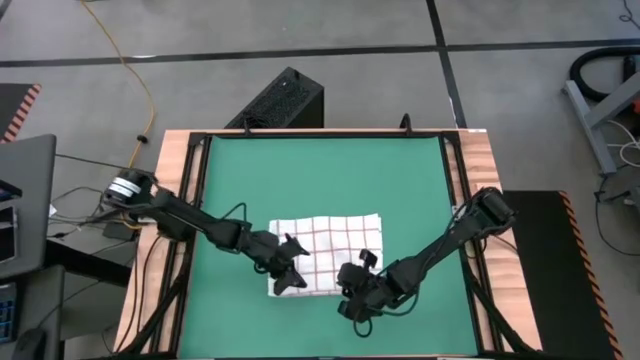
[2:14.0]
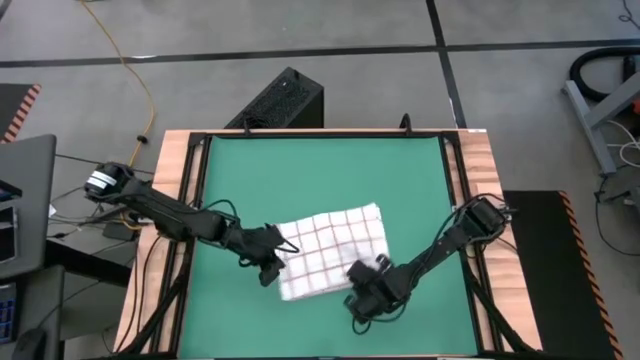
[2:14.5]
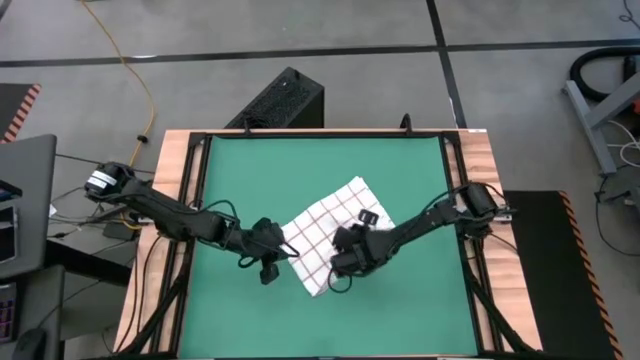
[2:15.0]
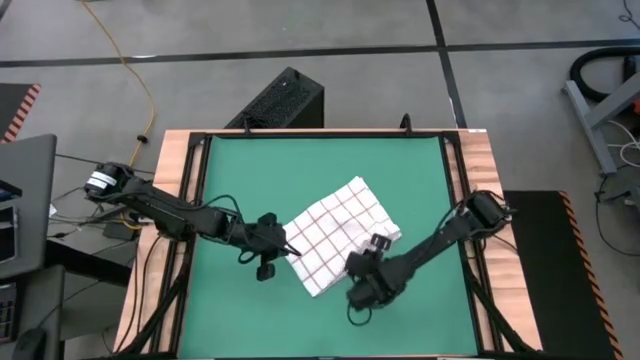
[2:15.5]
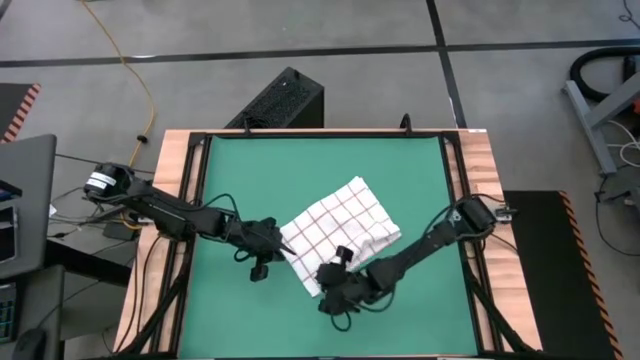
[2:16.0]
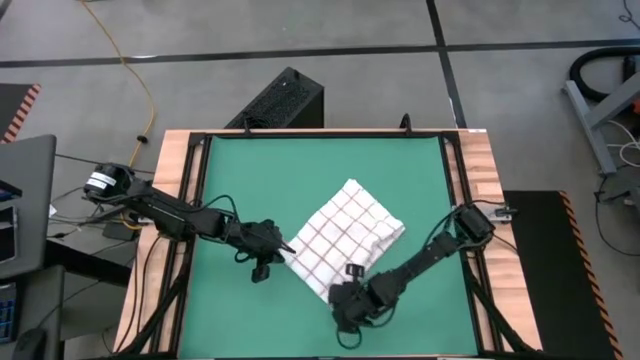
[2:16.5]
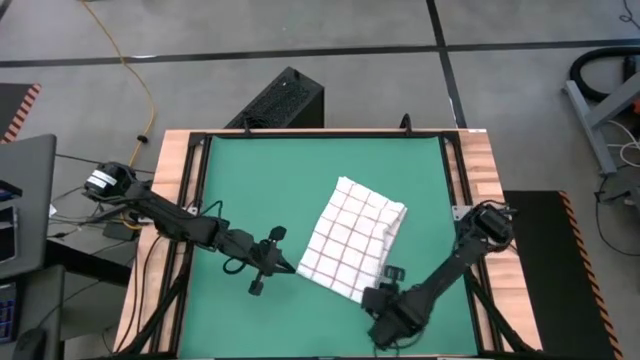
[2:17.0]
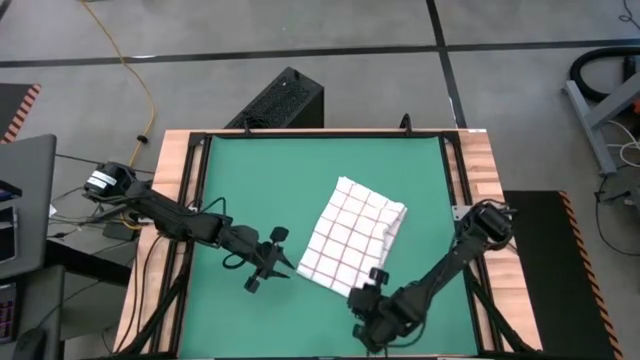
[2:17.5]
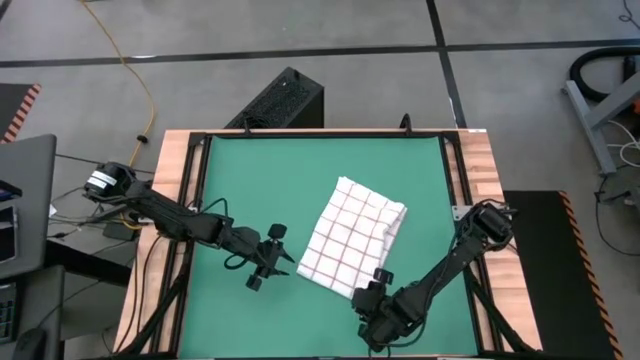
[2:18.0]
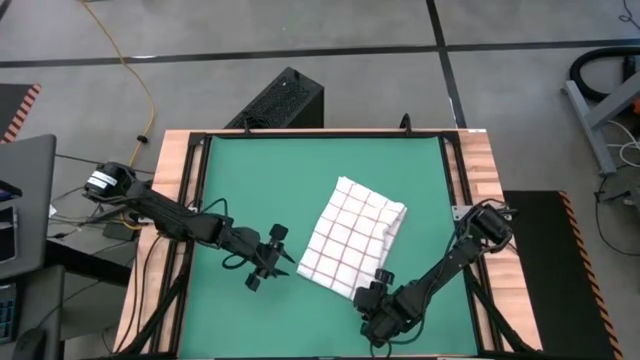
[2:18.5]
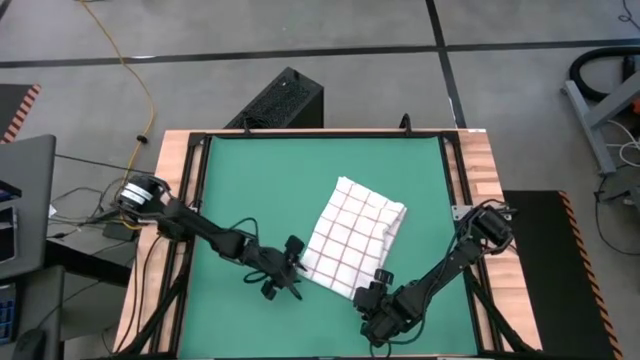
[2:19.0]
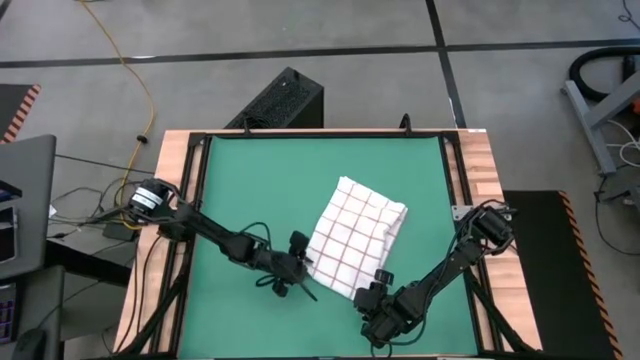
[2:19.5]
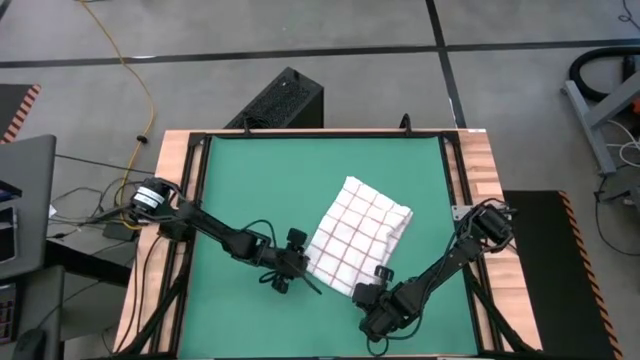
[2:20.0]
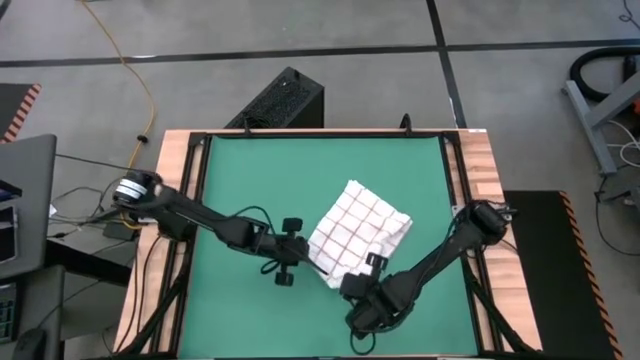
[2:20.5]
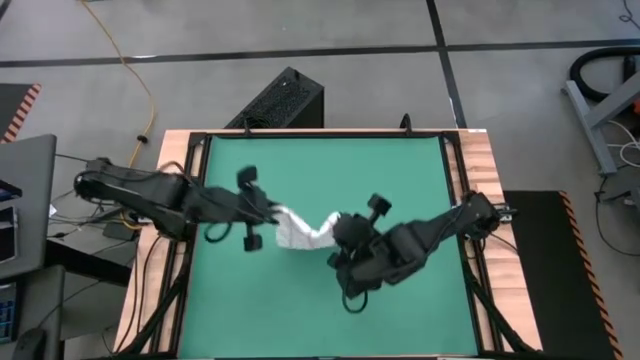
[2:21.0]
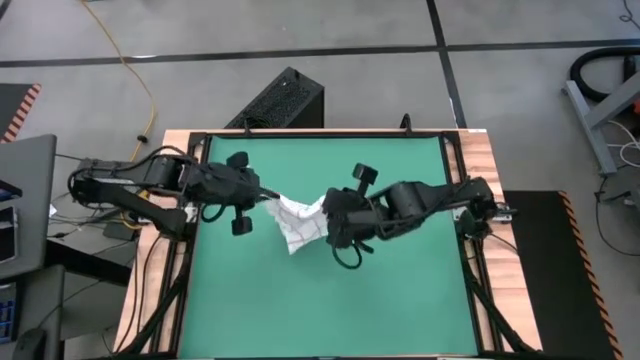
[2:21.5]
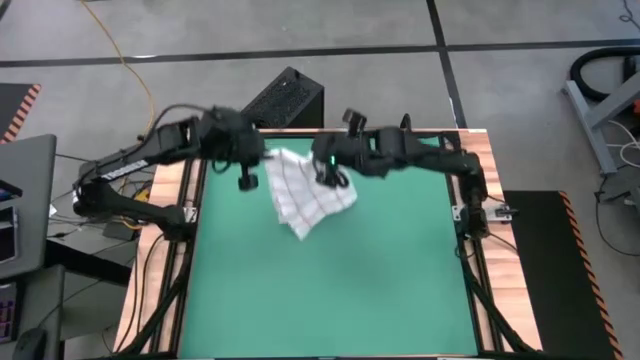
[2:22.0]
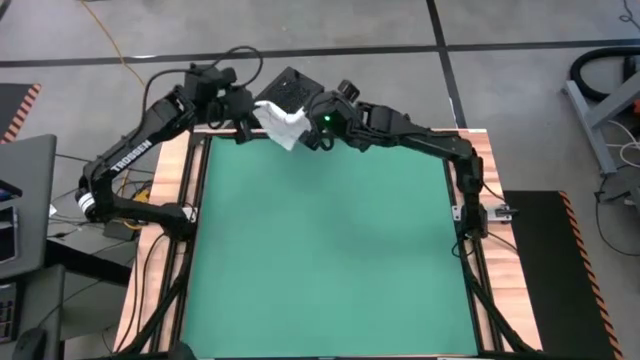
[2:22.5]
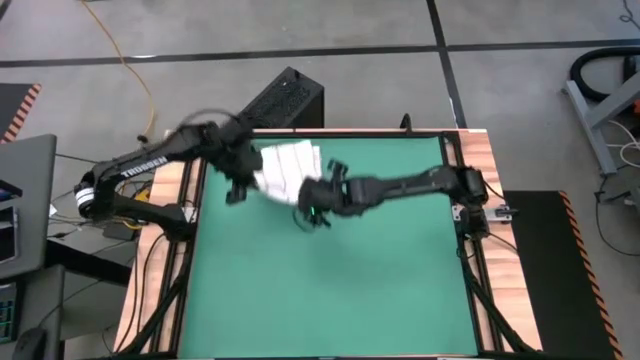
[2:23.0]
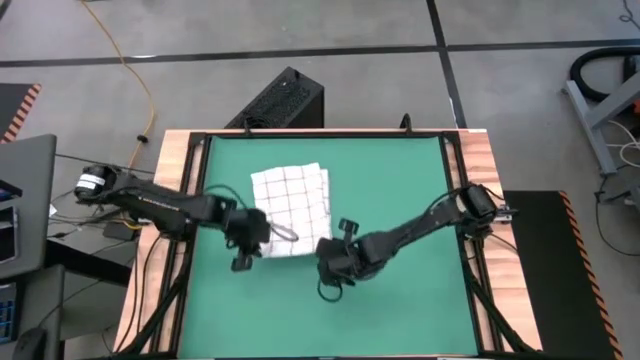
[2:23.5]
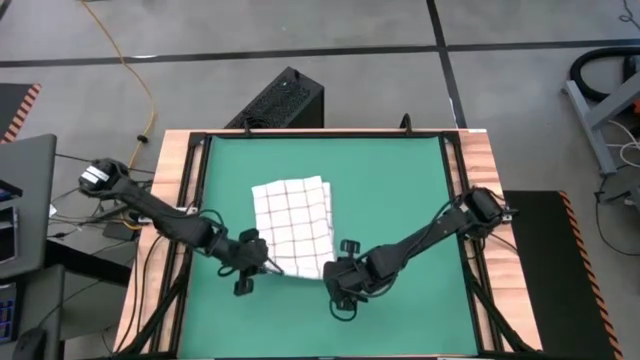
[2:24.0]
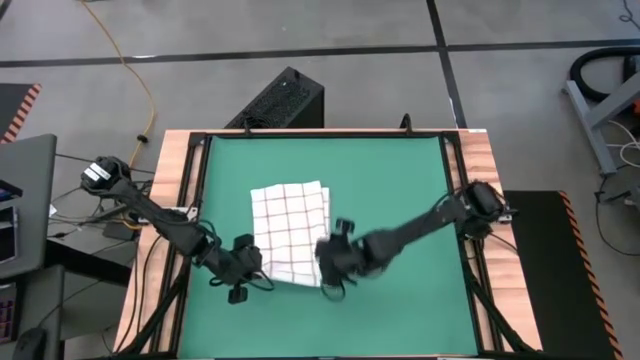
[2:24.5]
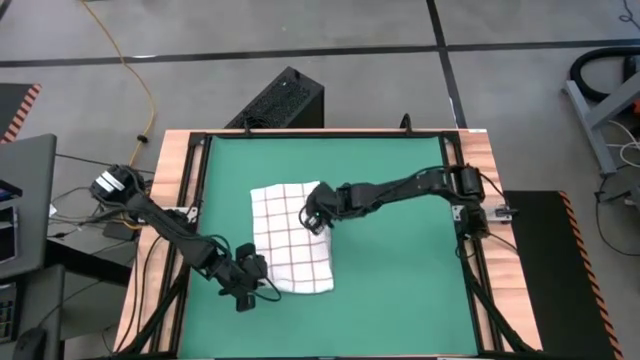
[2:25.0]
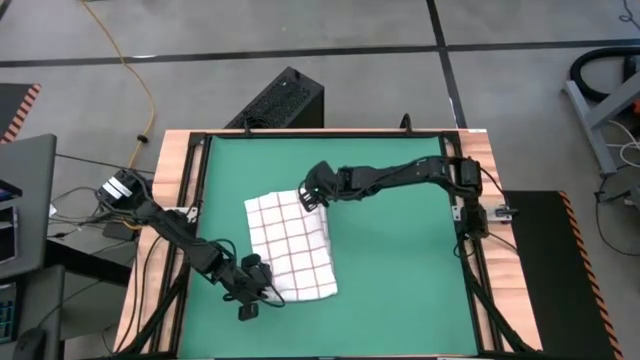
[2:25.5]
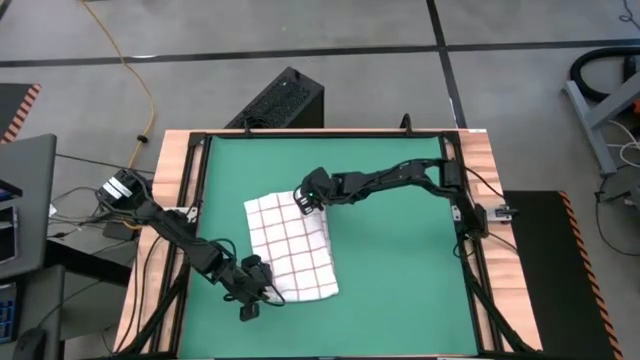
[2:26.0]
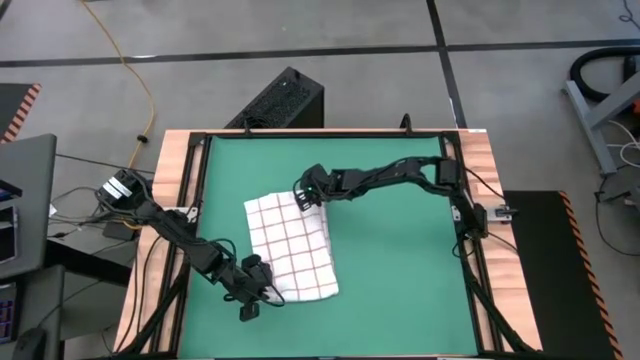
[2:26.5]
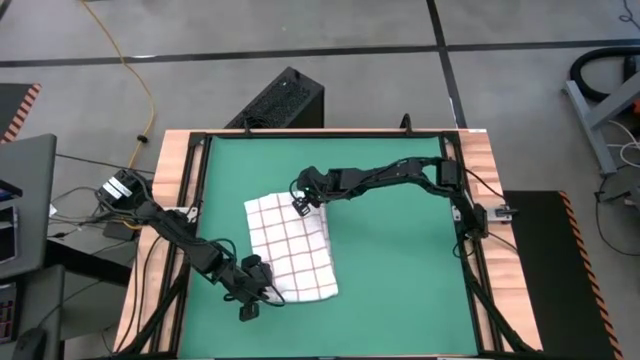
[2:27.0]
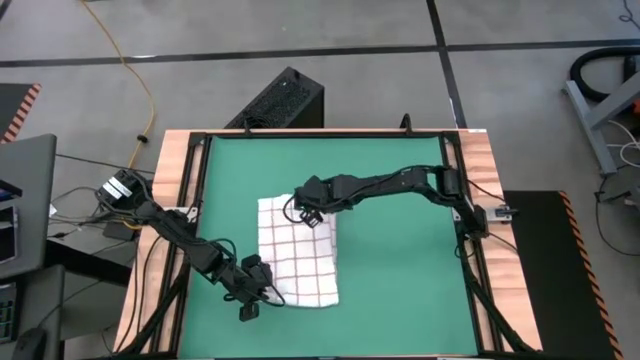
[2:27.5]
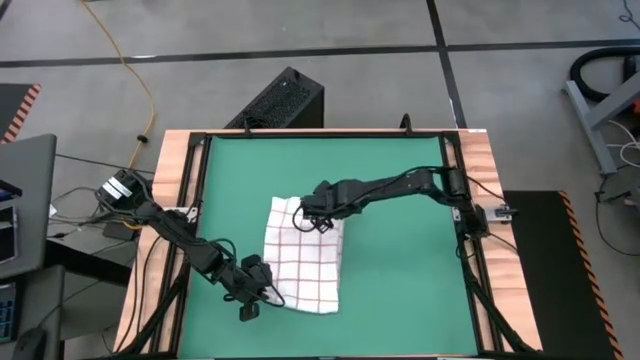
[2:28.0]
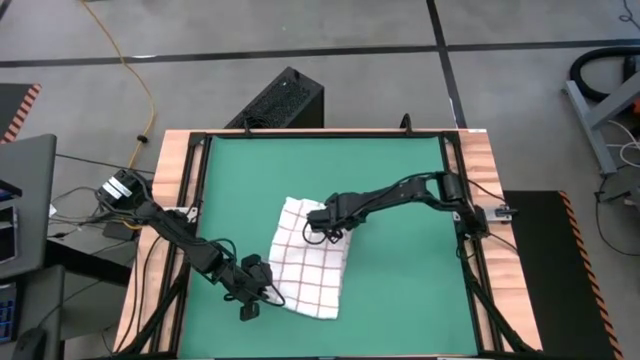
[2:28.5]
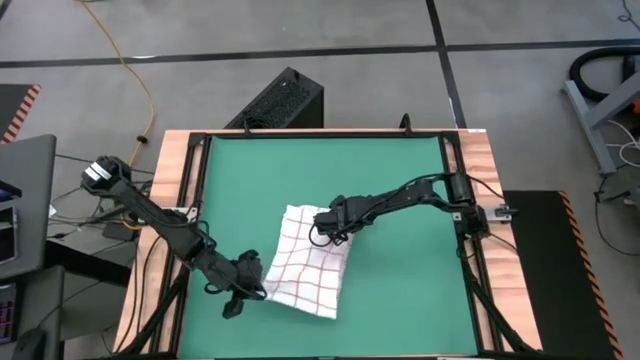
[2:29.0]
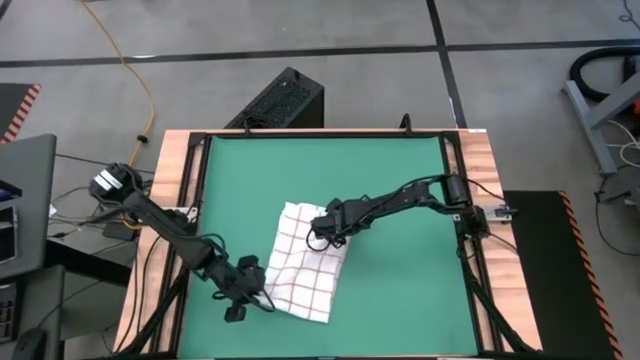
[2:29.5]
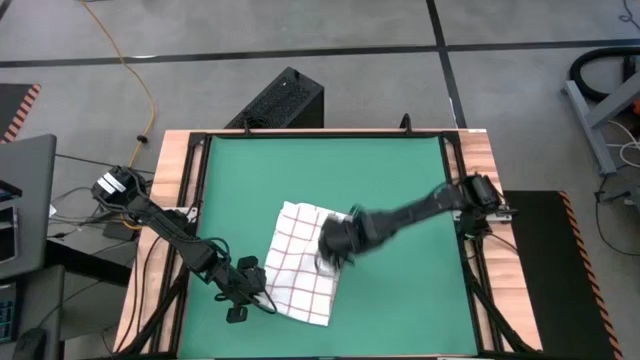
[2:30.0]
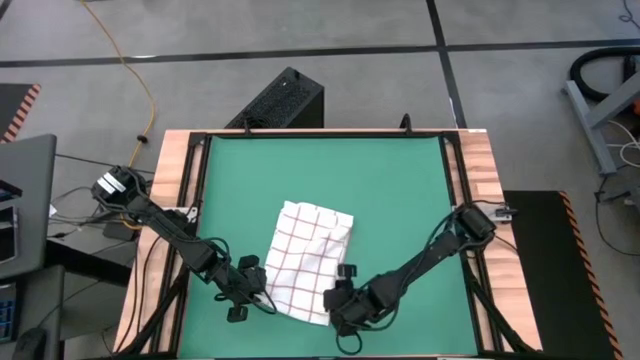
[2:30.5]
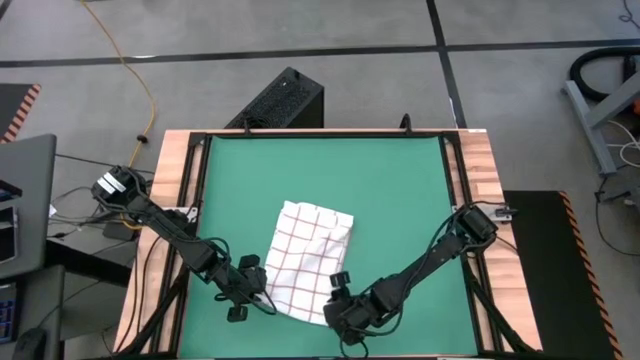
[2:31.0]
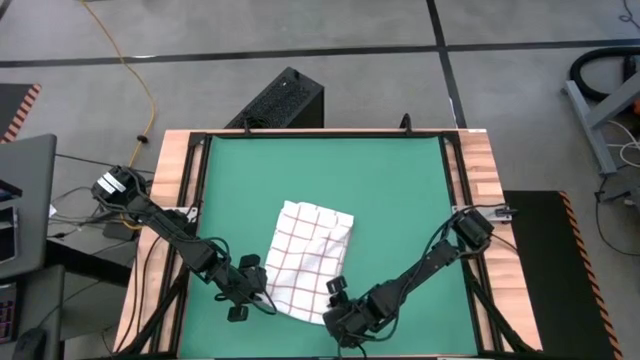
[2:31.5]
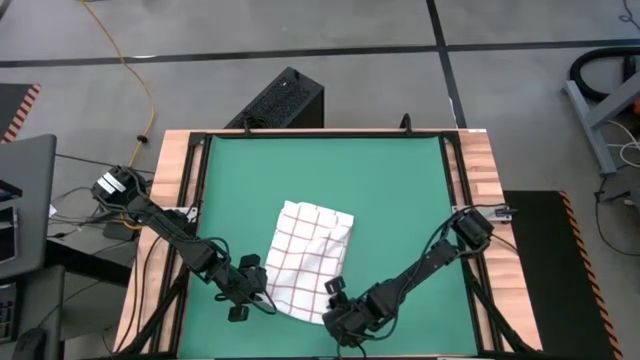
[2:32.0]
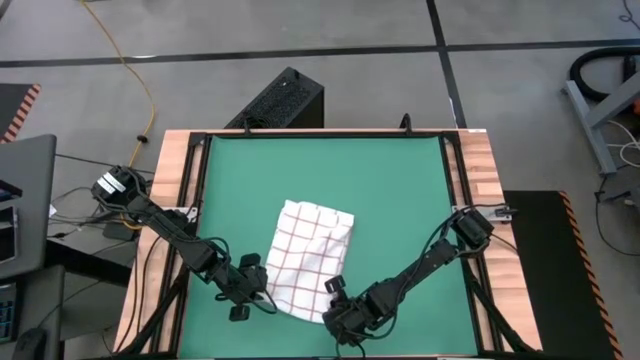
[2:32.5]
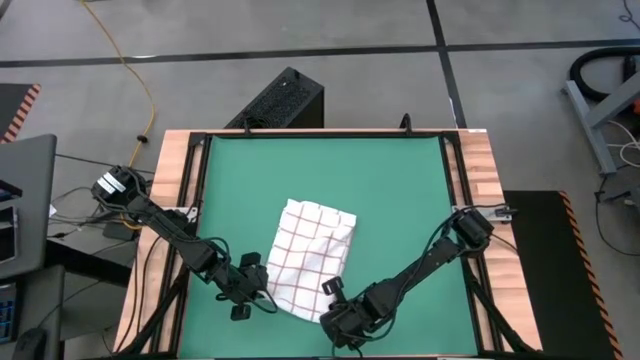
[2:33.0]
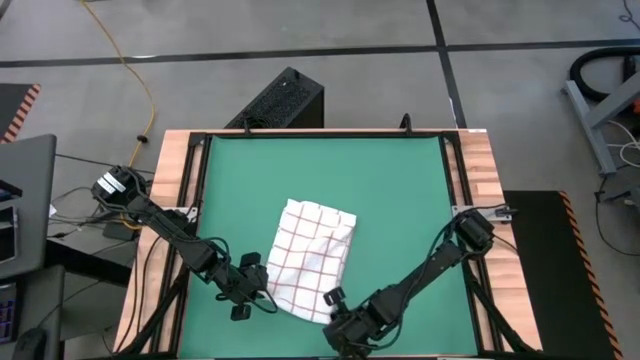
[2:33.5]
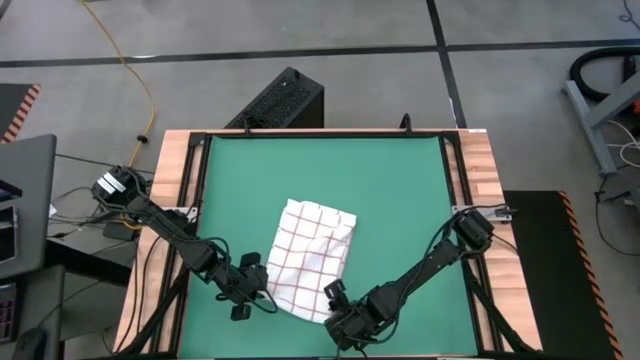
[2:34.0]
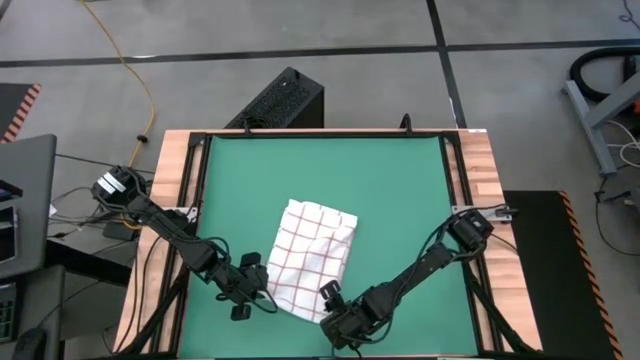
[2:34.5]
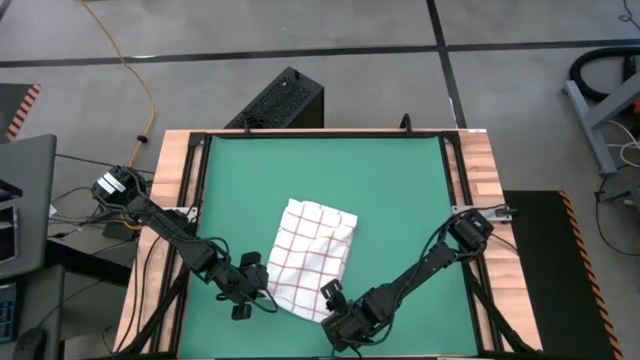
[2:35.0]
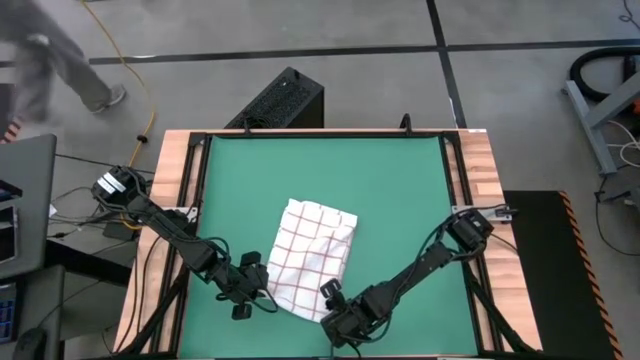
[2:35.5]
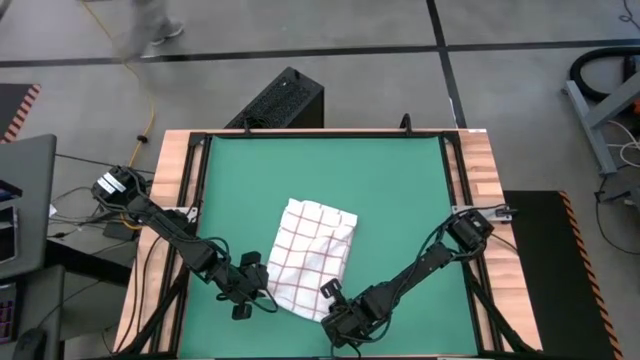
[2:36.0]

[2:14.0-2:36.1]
Task: Roll towel into tight, uniform cylinder
Roll the white patterned towel
